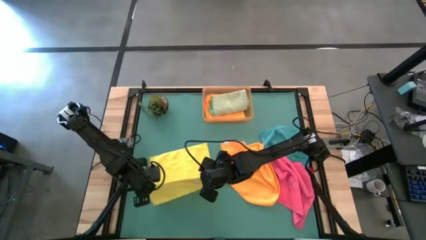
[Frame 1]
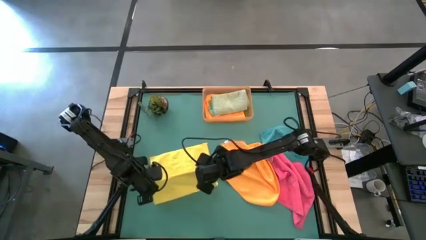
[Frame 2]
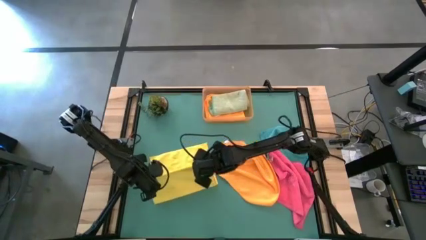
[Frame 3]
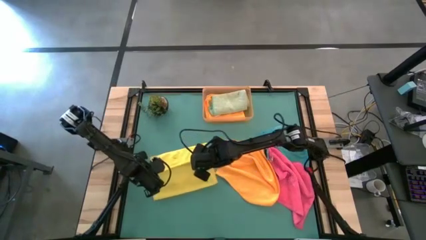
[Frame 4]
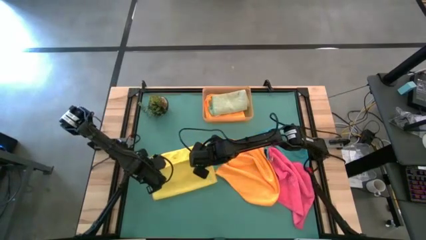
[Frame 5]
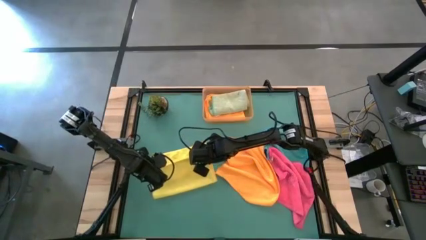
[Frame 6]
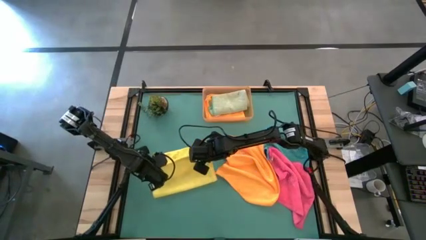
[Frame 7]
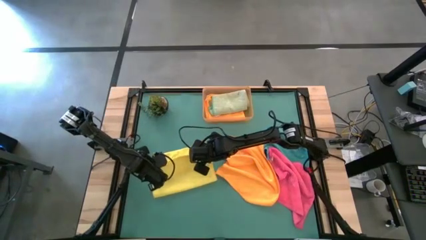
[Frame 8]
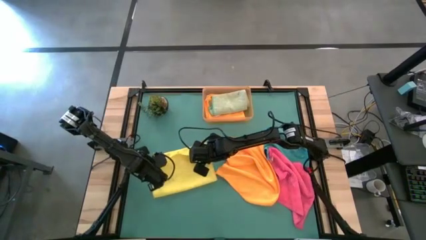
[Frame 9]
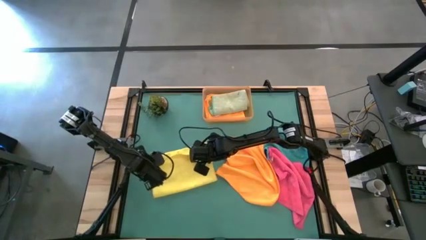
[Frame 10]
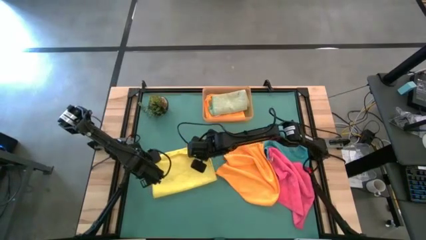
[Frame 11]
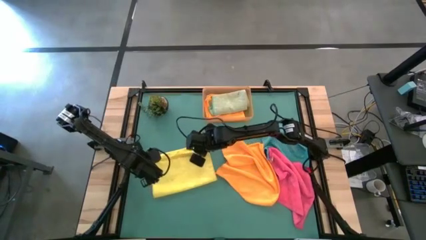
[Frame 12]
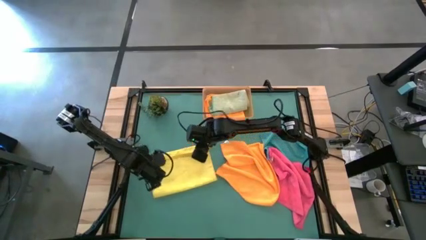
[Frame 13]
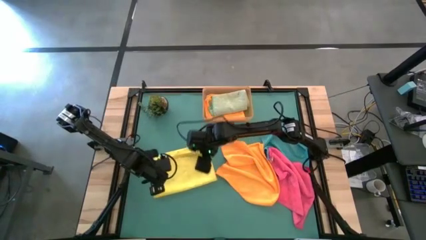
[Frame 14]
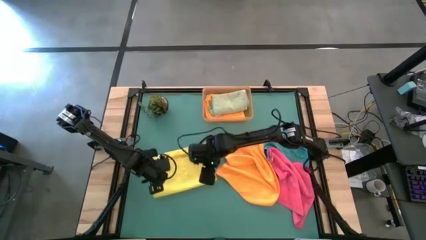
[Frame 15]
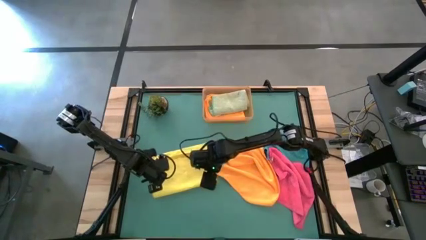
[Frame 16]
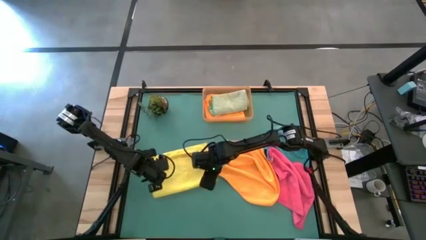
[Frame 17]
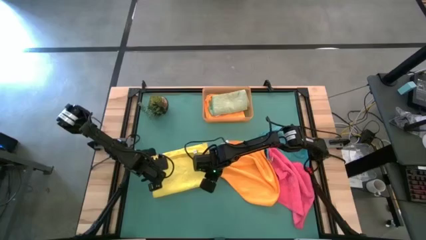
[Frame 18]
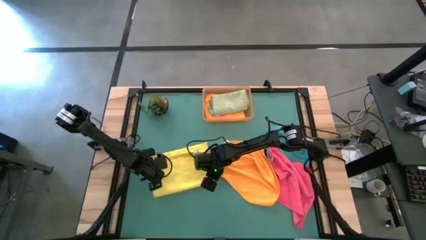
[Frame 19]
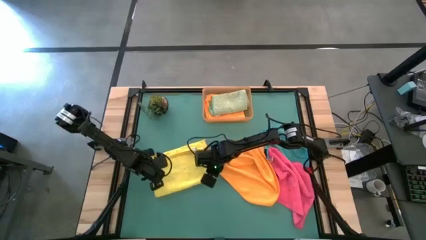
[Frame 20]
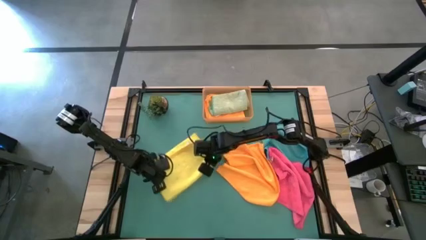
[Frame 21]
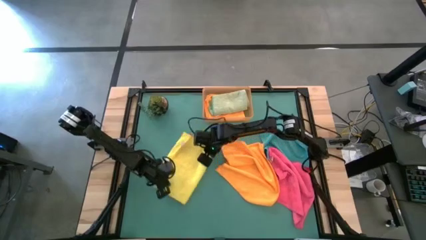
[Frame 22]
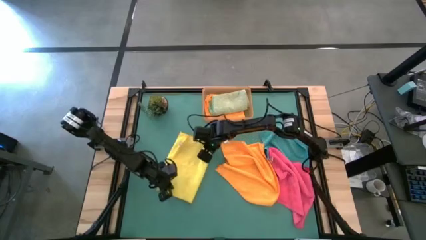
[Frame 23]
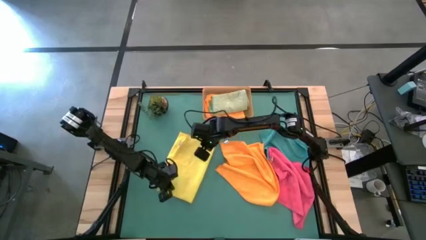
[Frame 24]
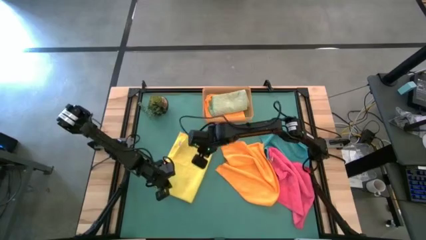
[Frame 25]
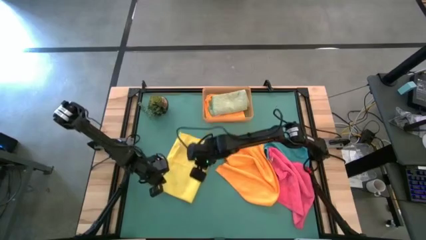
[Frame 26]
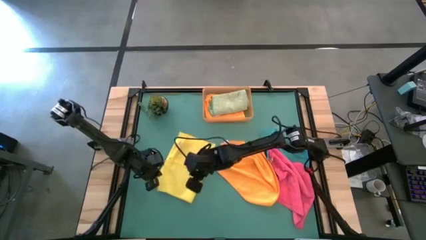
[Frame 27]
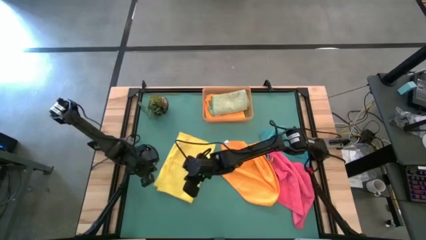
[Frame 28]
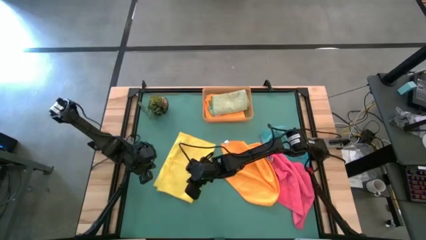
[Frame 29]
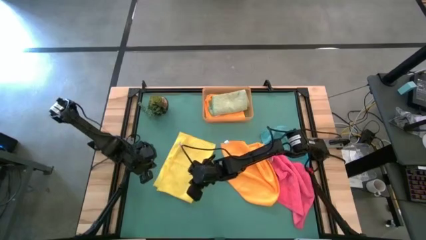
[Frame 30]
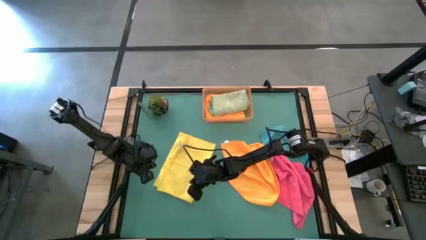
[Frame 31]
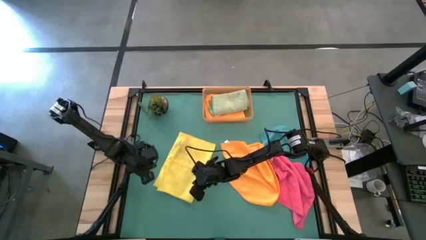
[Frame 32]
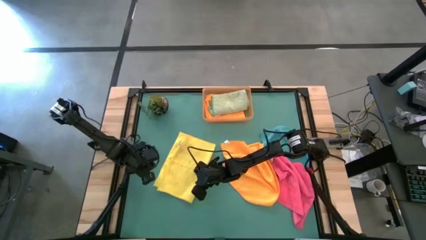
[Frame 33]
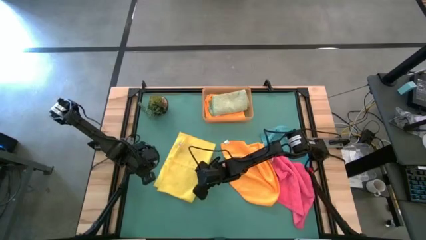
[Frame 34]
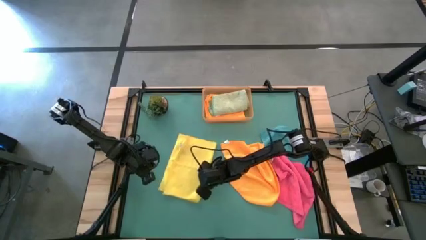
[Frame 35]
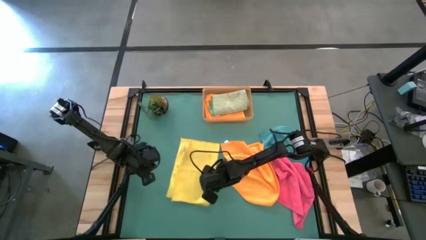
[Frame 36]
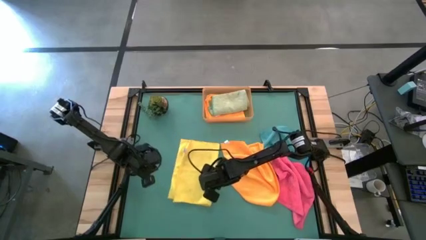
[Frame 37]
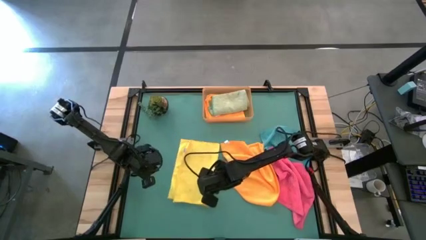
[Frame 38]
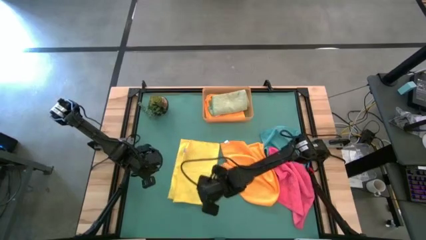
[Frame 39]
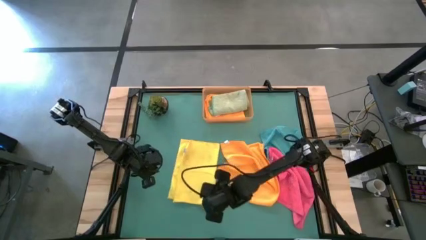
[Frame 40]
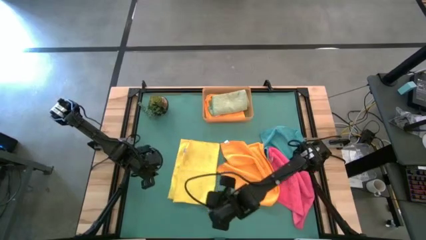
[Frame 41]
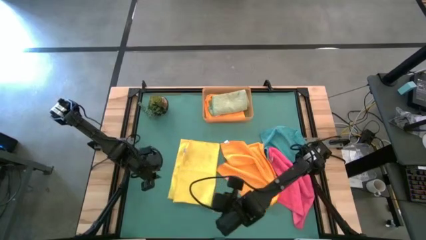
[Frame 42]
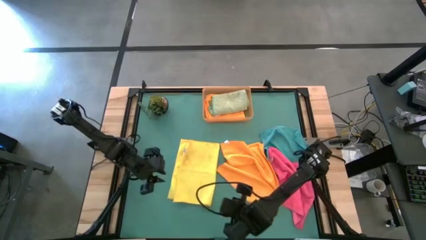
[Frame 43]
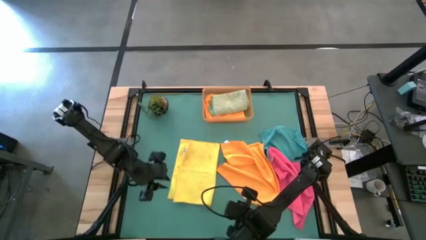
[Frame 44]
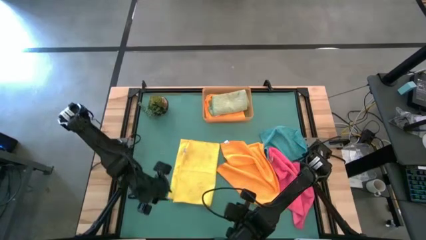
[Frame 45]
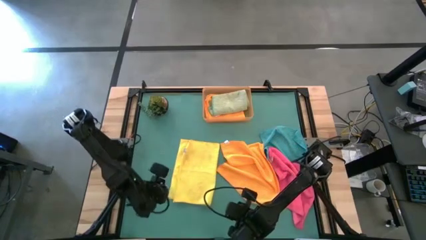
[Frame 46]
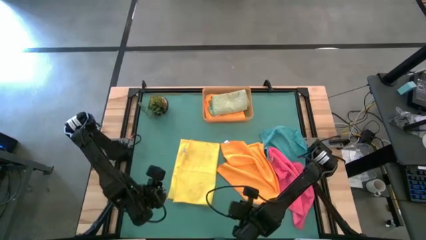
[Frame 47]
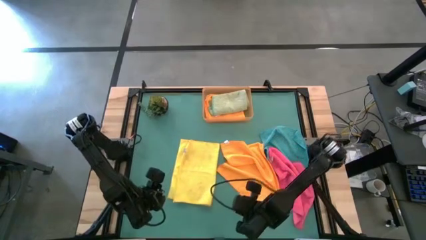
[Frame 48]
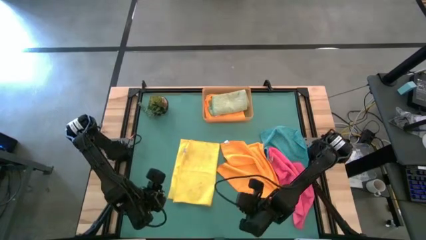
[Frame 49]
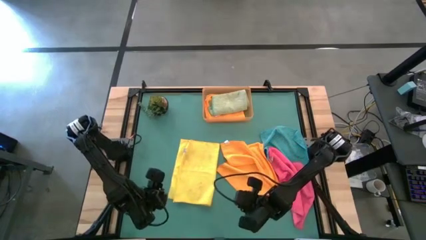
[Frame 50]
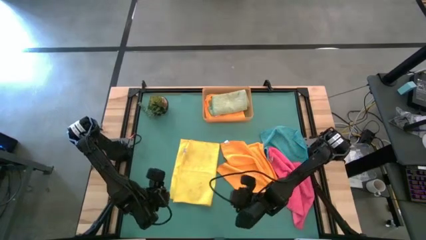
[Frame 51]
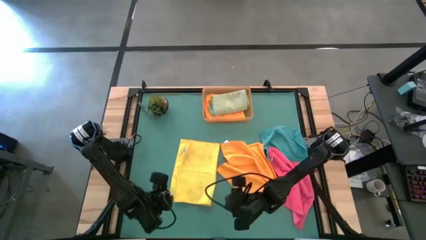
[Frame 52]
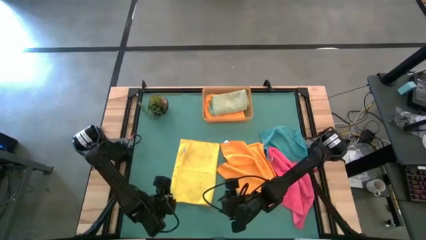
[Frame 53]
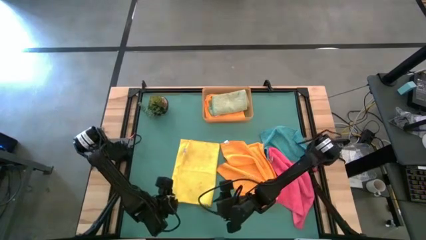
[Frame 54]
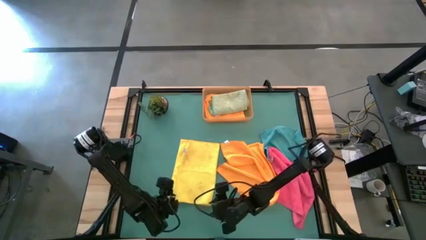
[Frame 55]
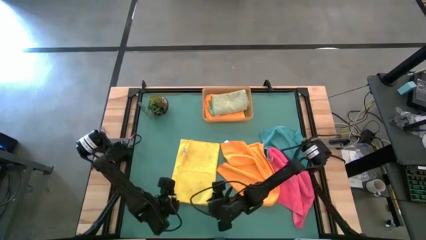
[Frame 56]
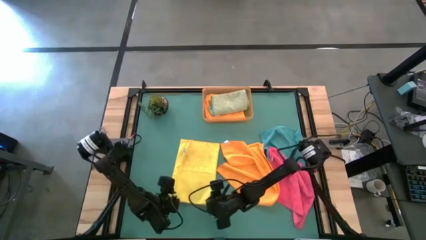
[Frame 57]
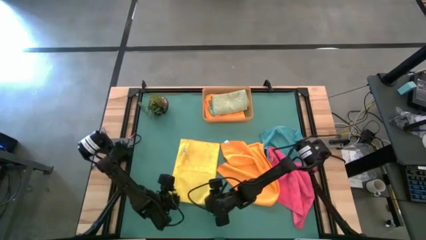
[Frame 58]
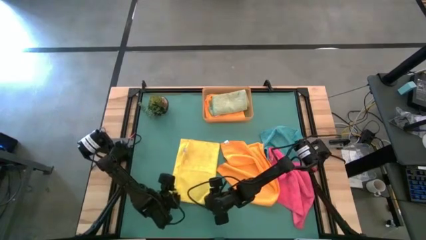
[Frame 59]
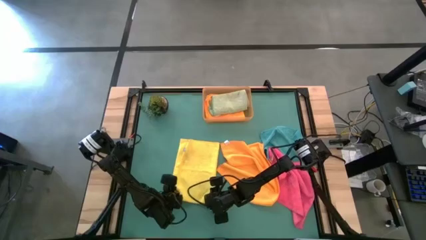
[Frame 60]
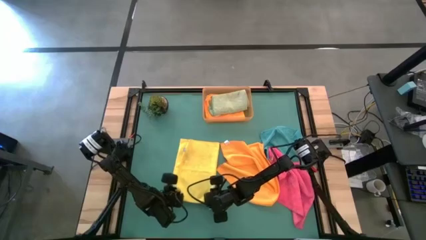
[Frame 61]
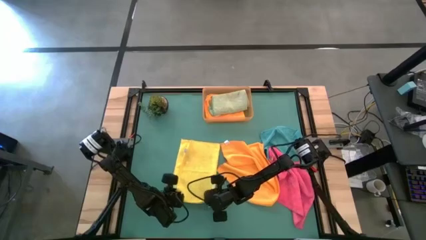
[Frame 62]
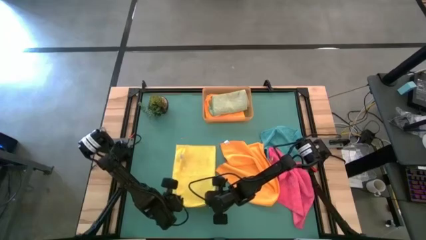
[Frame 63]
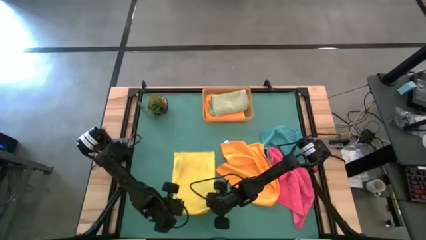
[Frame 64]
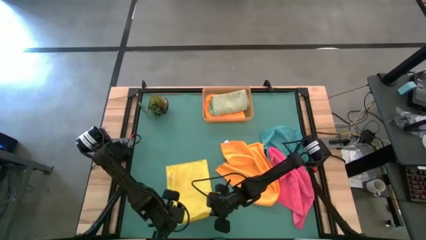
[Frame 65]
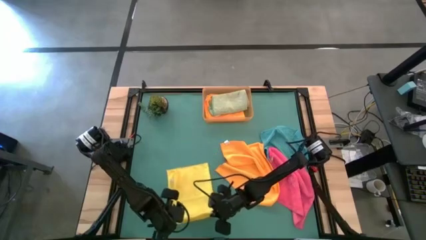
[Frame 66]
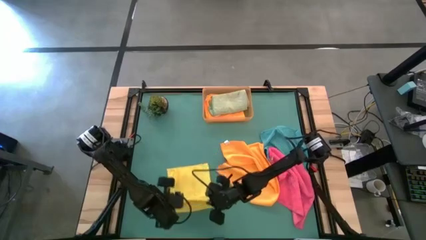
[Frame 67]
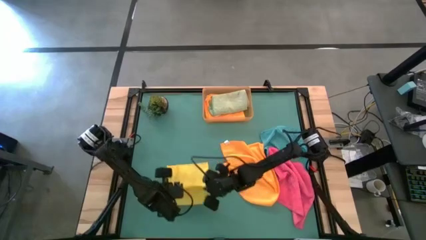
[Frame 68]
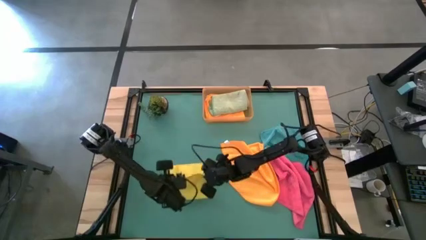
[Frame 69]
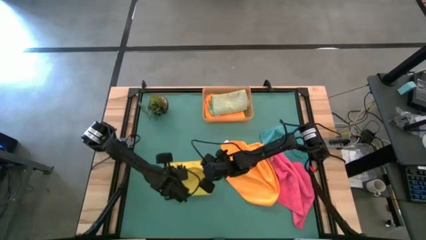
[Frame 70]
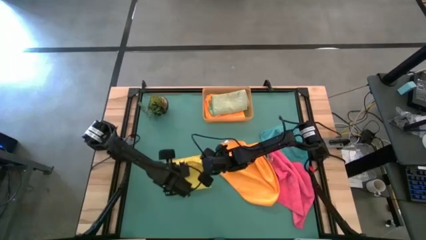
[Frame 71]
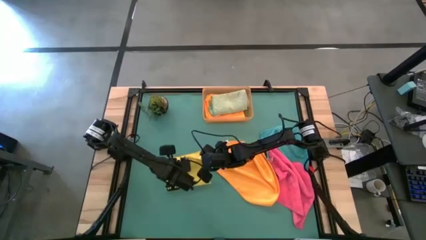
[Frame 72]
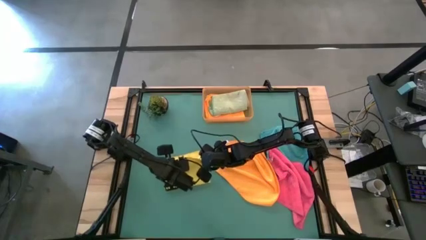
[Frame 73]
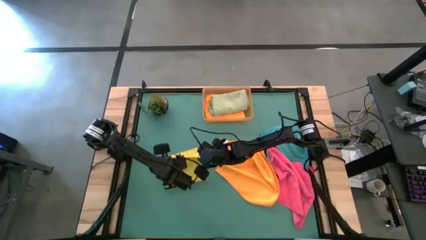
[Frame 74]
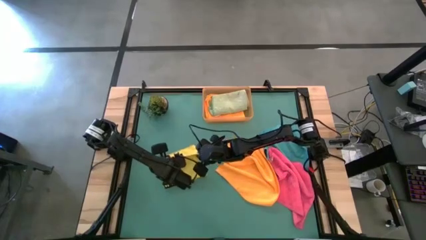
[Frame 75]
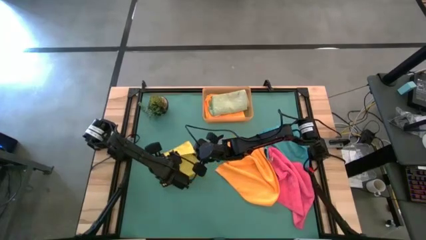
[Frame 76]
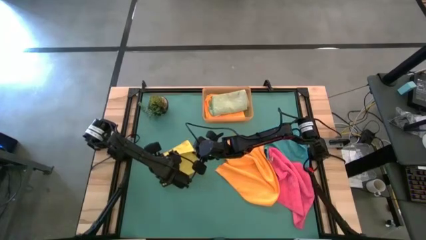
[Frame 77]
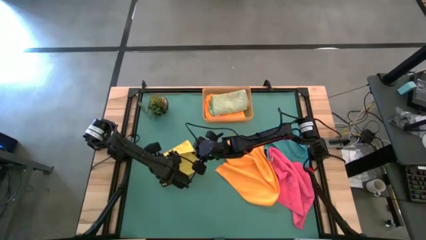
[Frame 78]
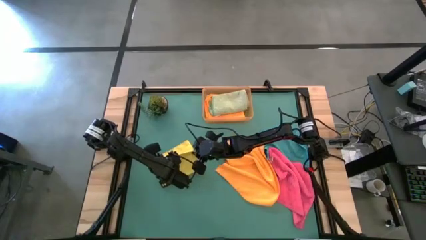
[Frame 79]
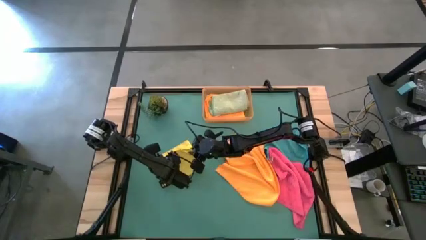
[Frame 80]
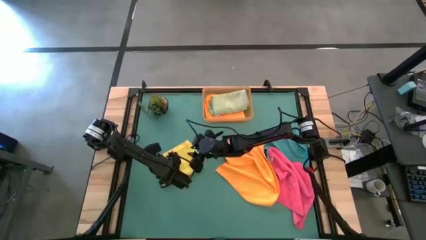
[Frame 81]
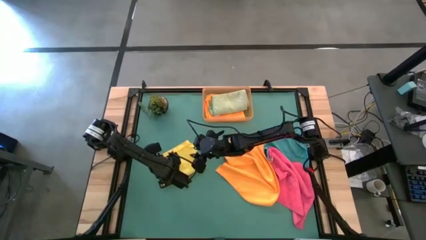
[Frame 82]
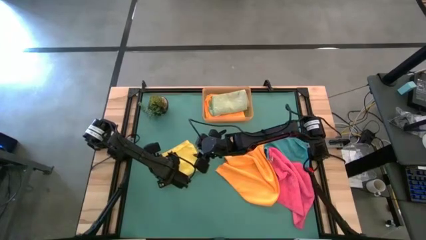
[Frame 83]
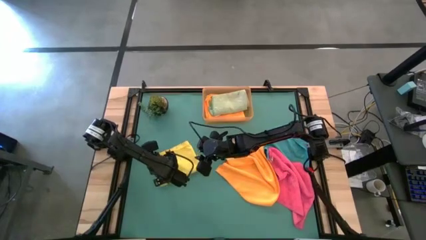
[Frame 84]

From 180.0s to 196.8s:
Task: Fold microfiber towels
Fold the yellow towel
